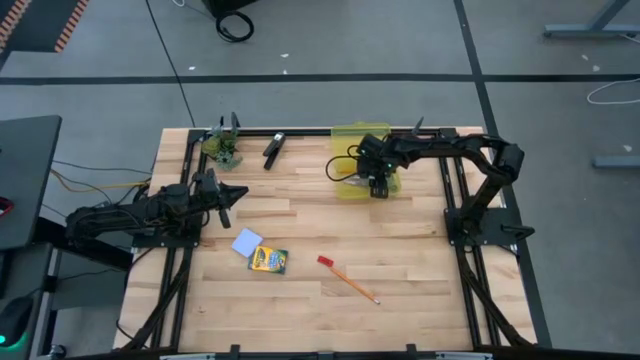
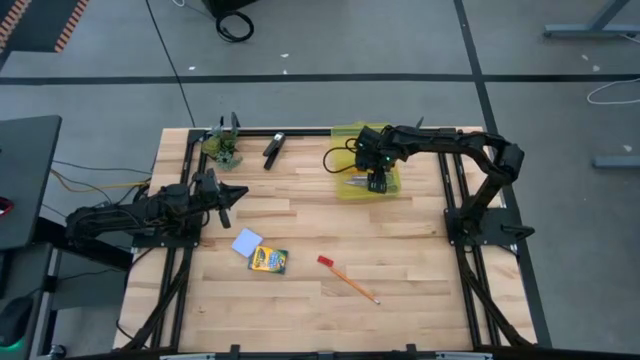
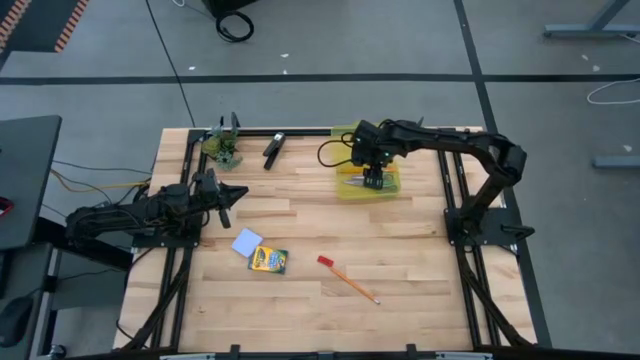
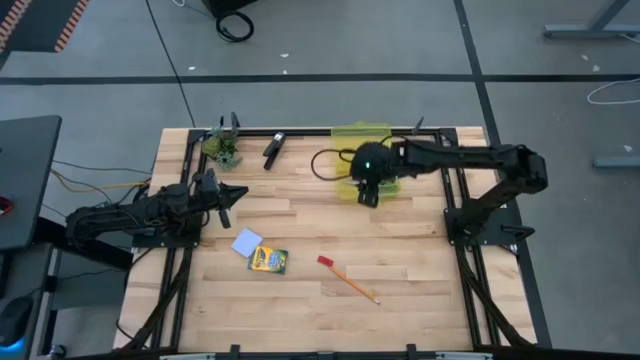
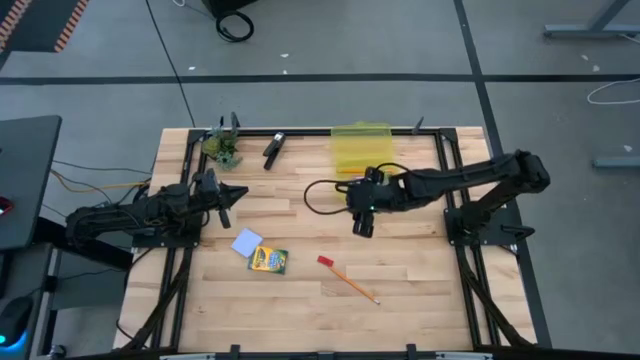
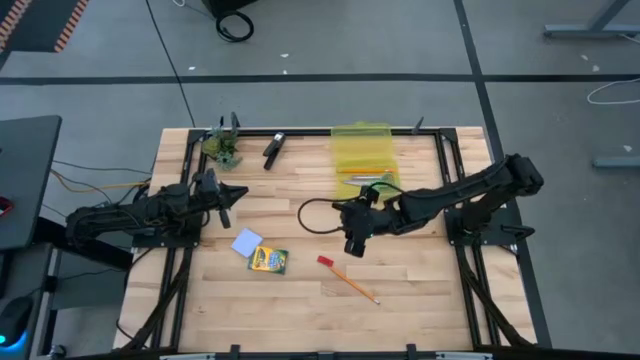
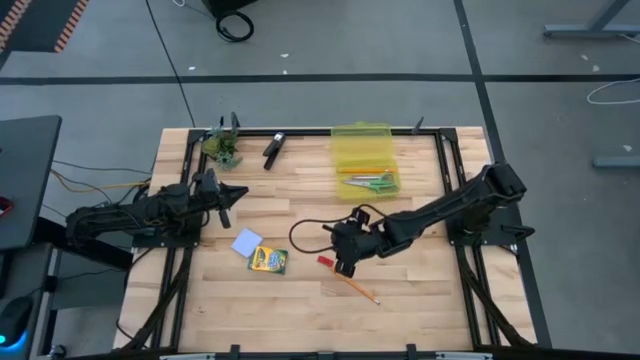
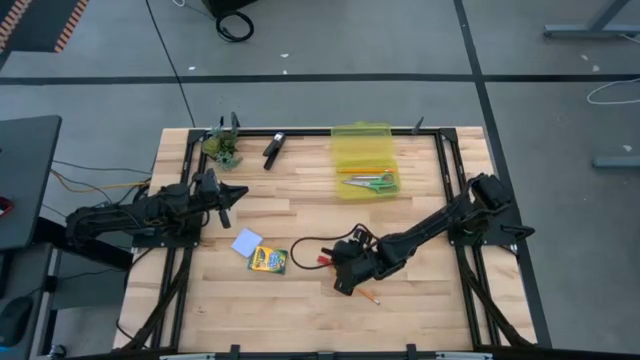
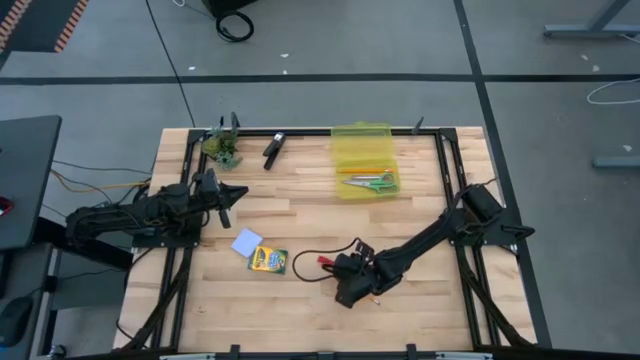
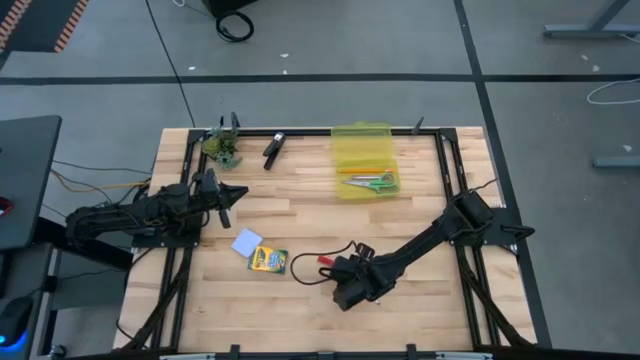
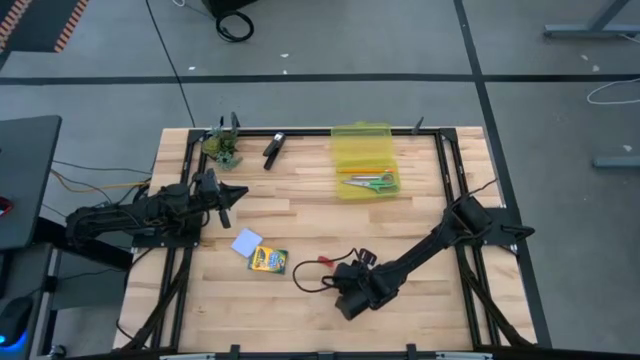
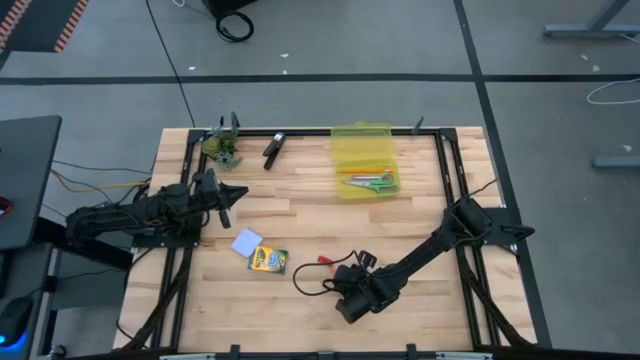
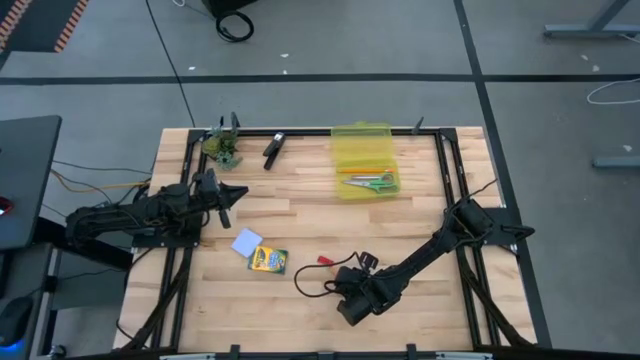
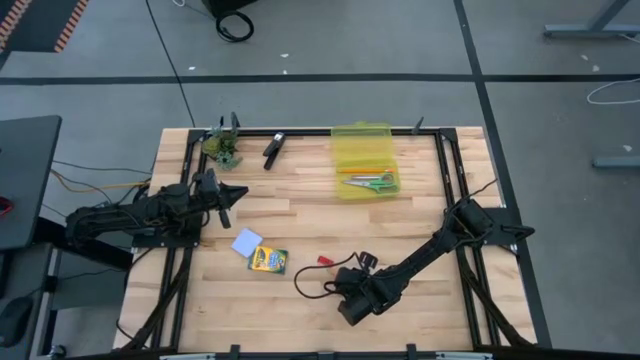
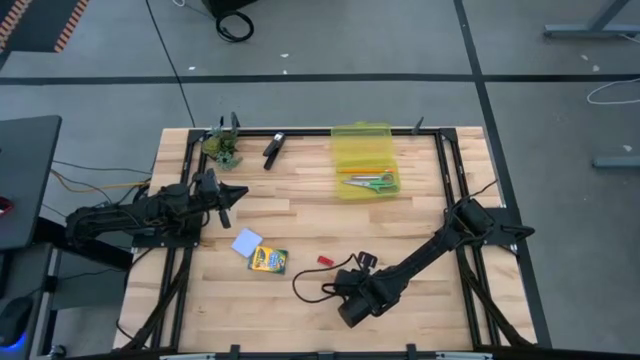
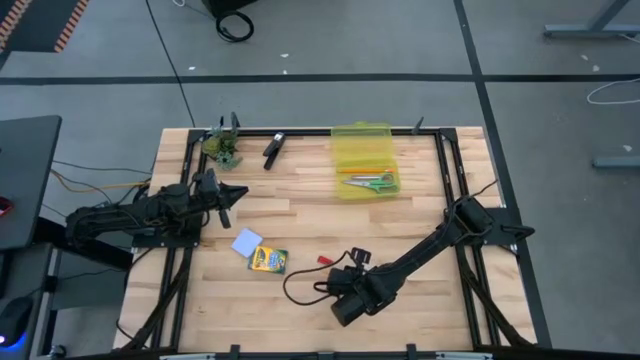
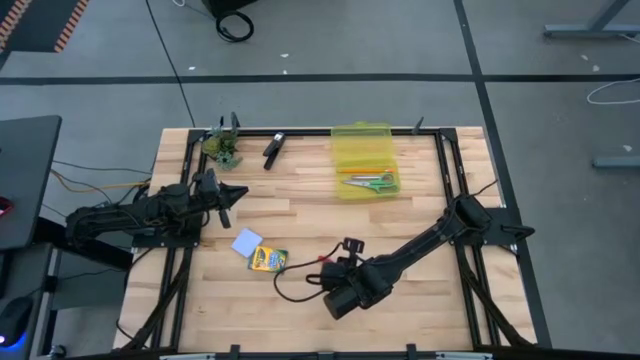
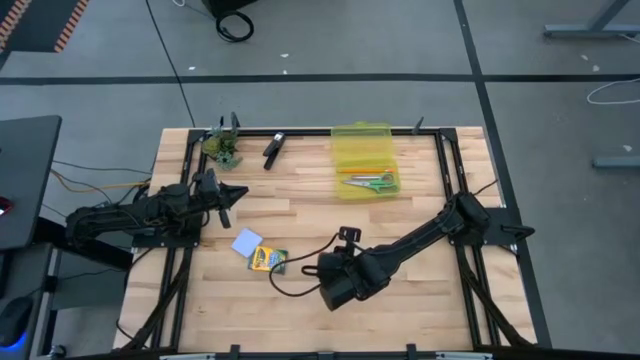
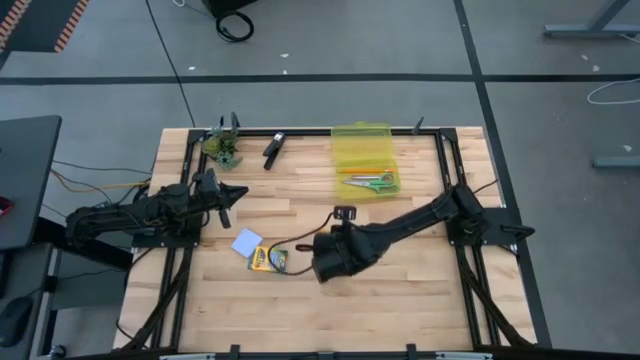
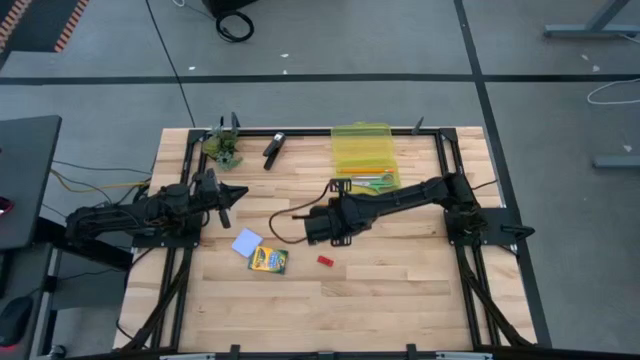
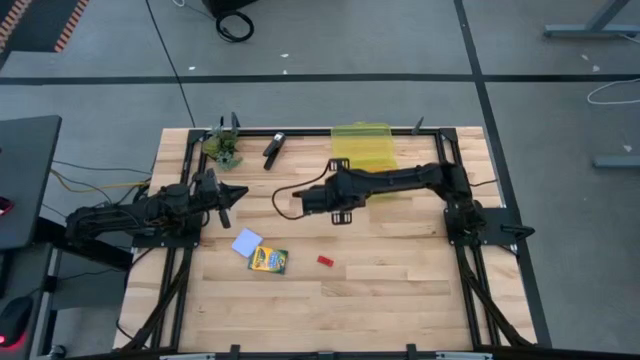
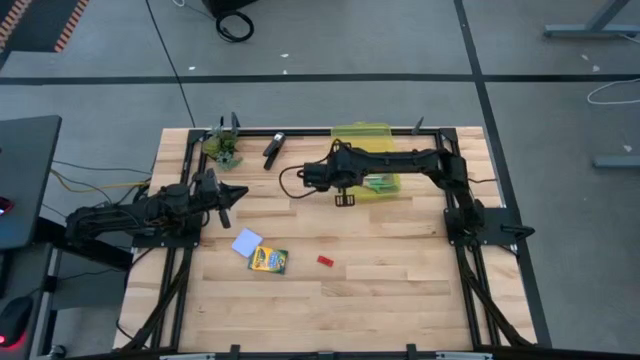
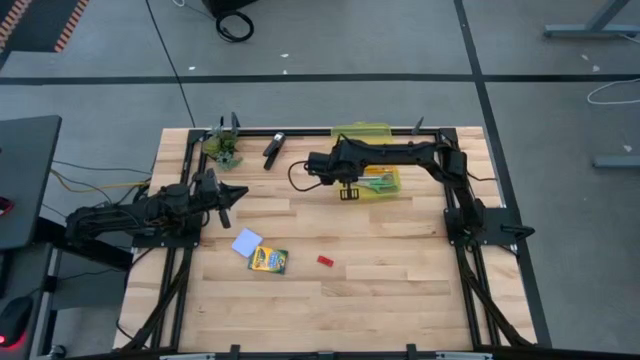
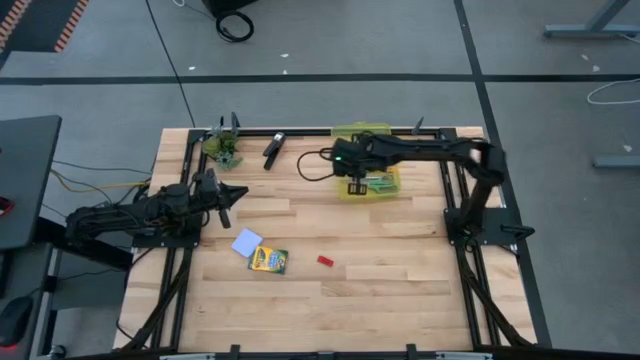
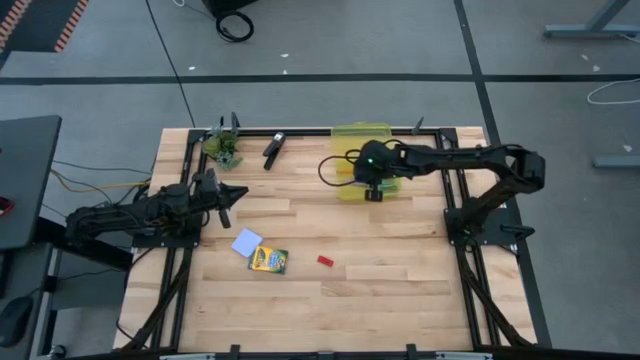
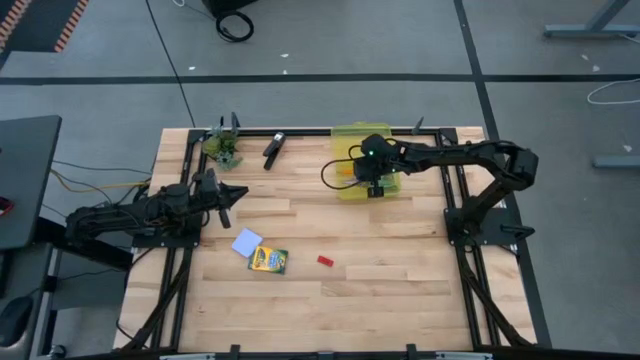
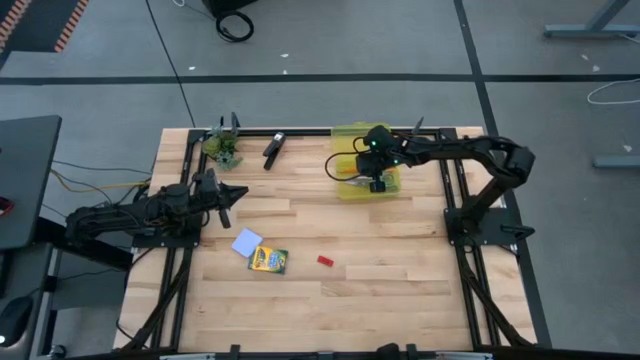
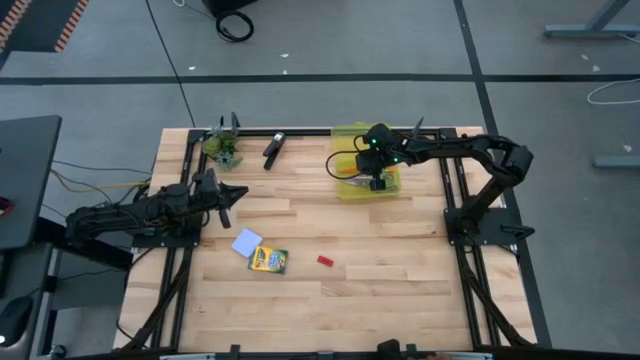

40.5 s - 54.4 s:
Task: Pack school essentials
Put the yellow pencil into the yellow supply box

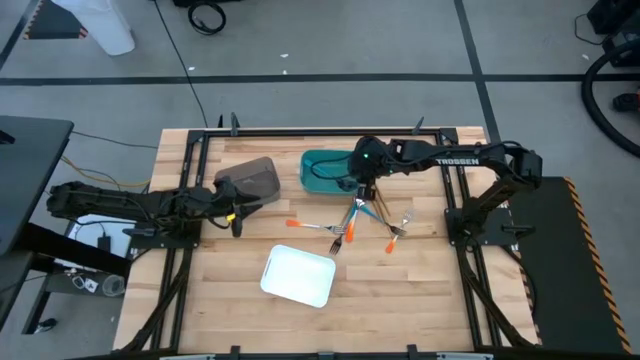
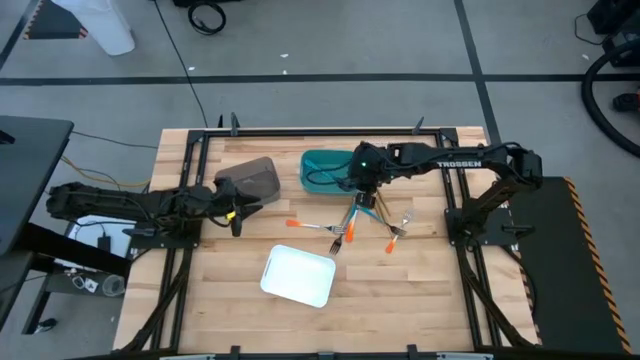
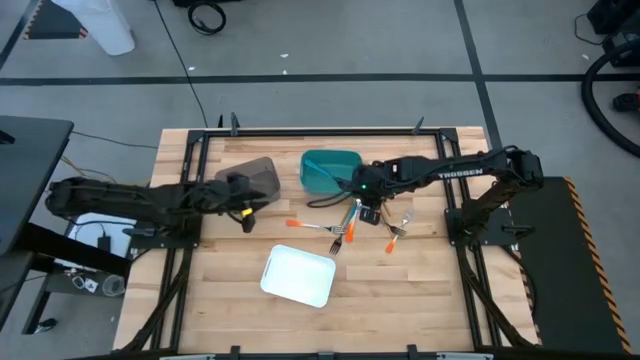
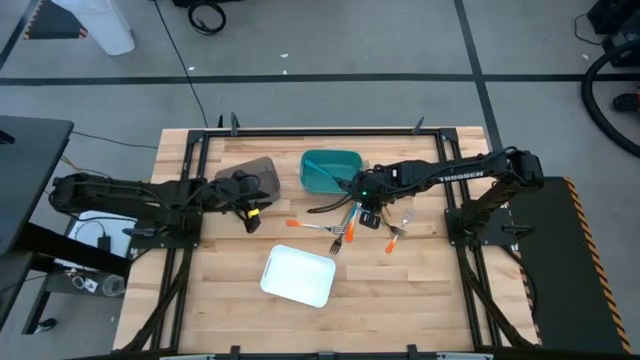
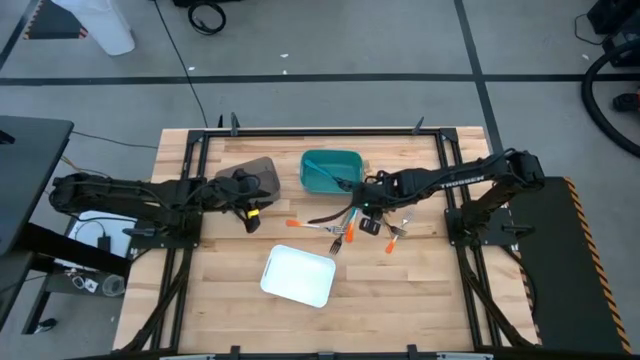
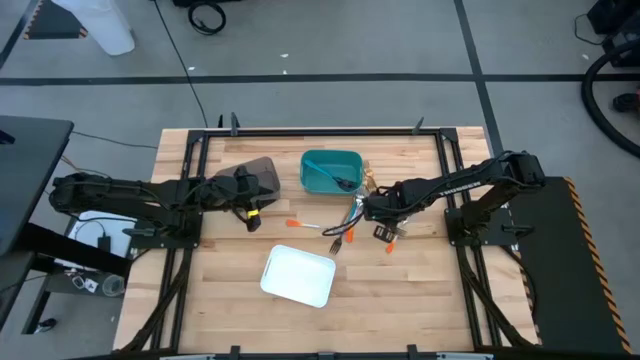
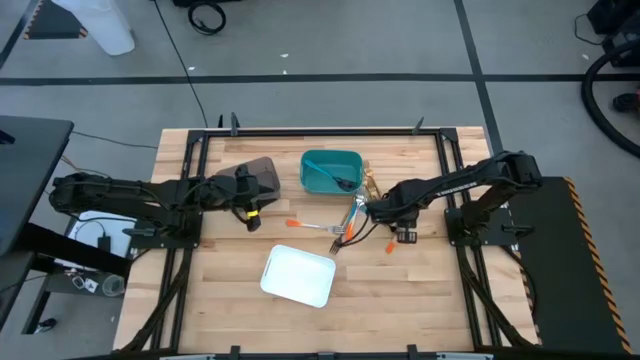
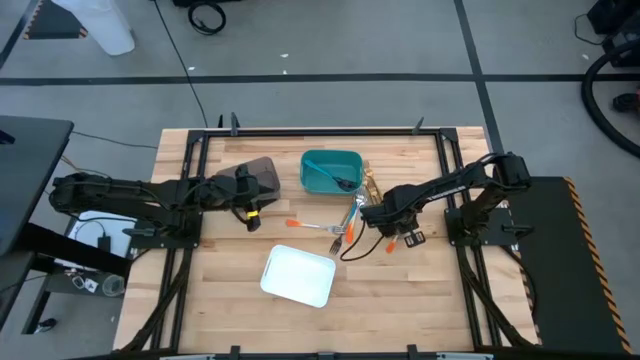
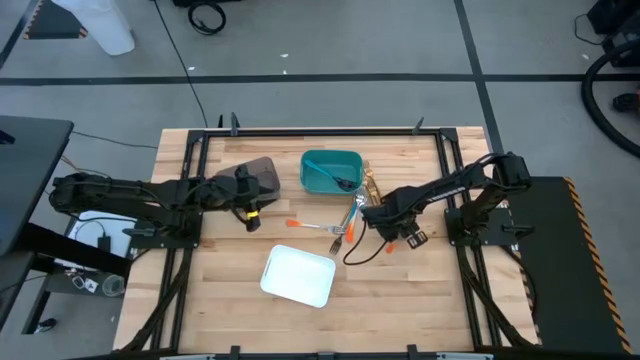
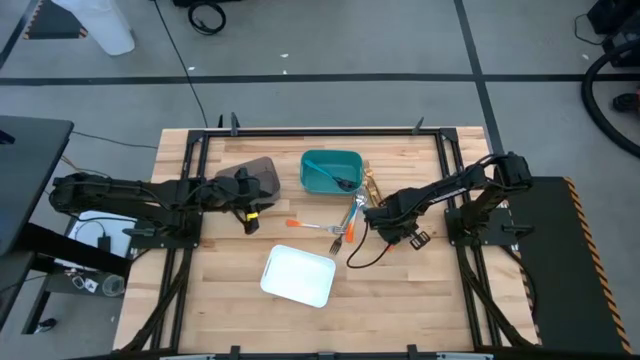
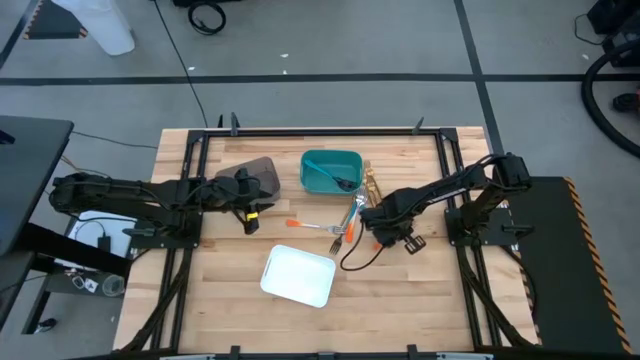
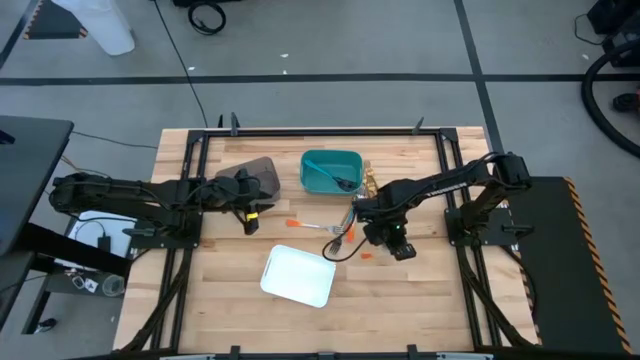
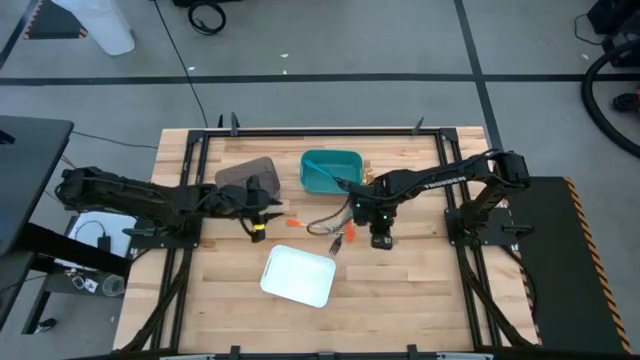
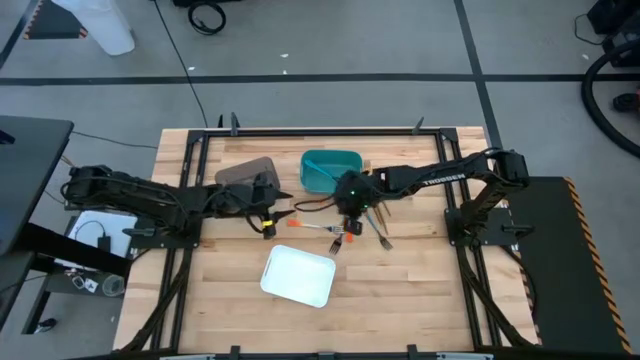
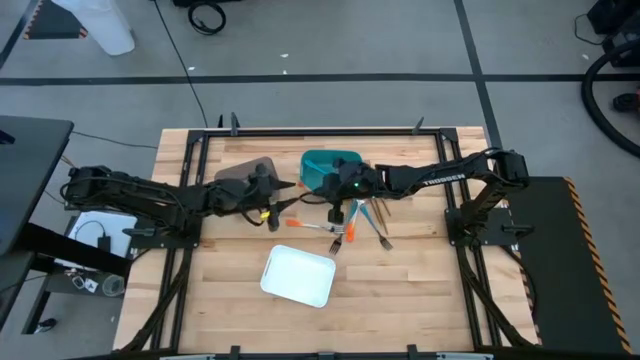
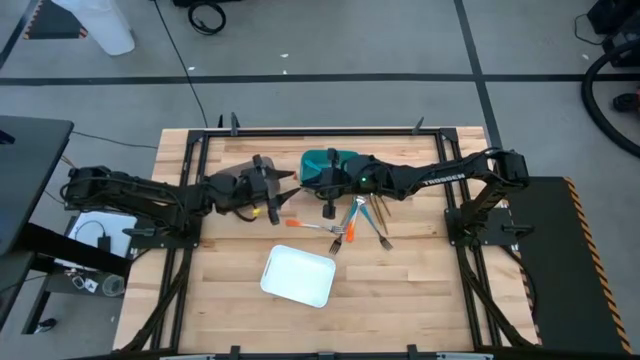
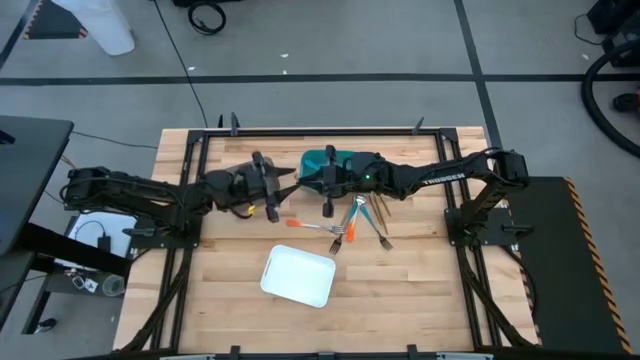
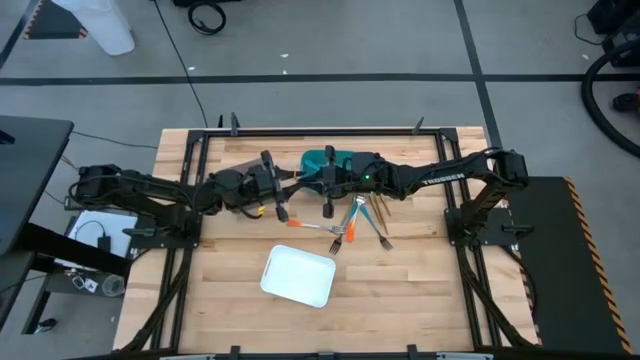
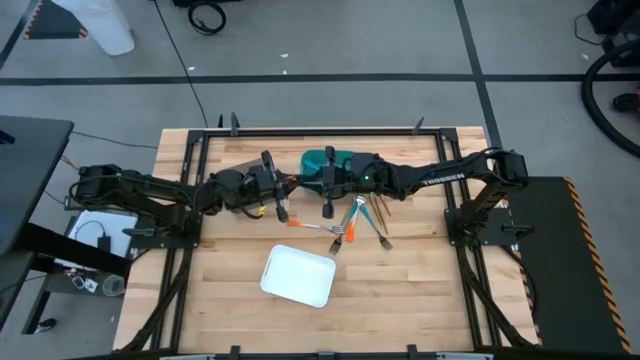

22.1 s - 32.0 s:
Task: Sort silverware by color (type)
Put the orange fork into the black bin
